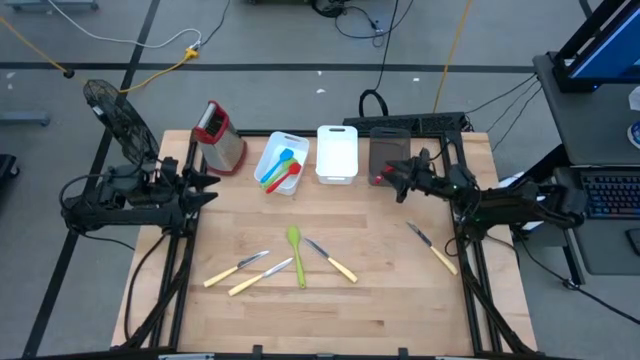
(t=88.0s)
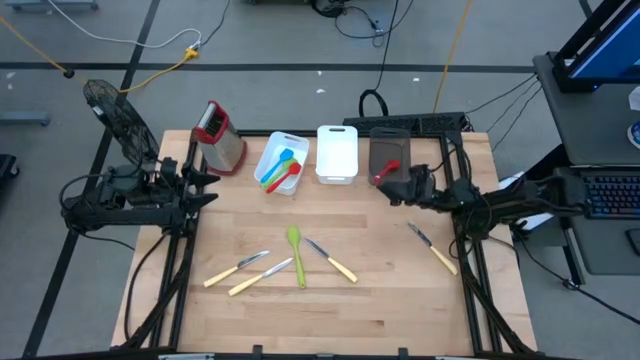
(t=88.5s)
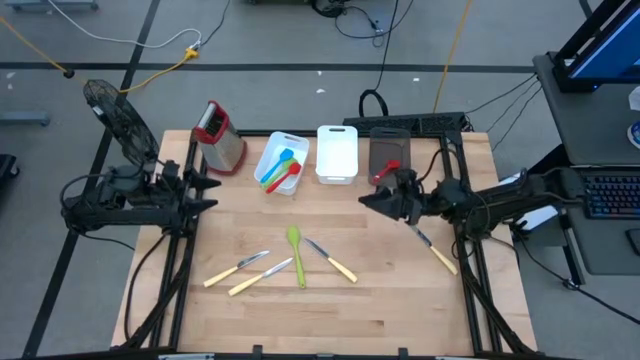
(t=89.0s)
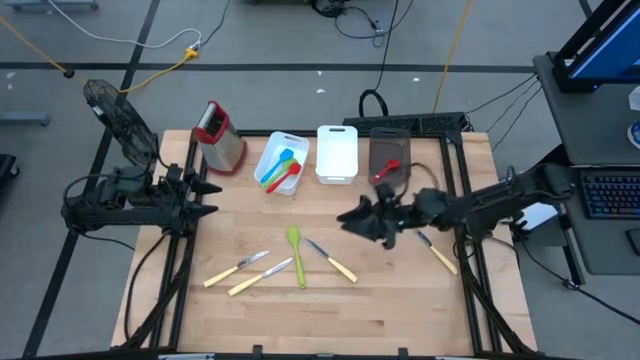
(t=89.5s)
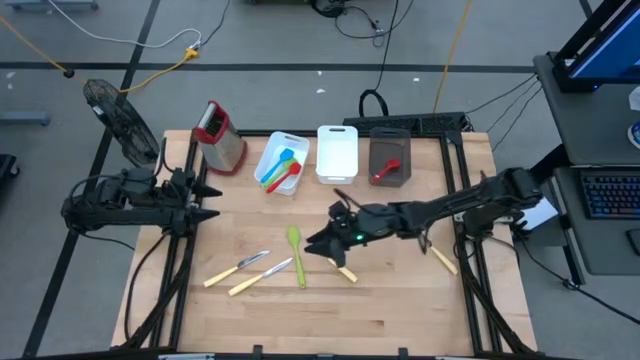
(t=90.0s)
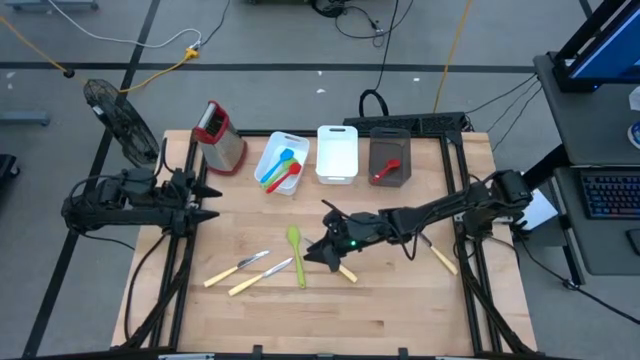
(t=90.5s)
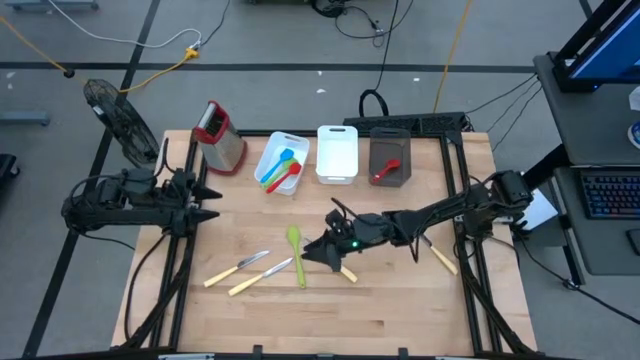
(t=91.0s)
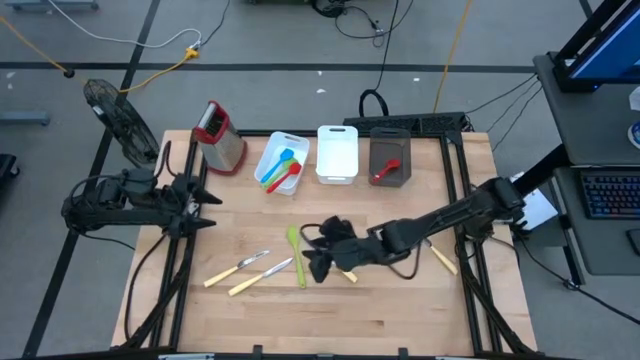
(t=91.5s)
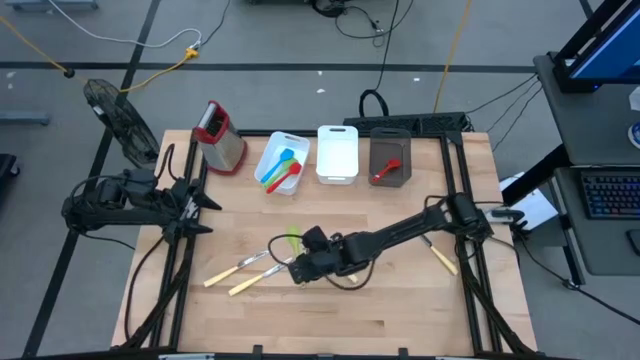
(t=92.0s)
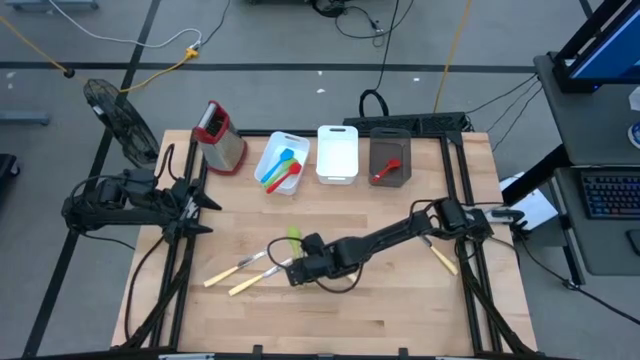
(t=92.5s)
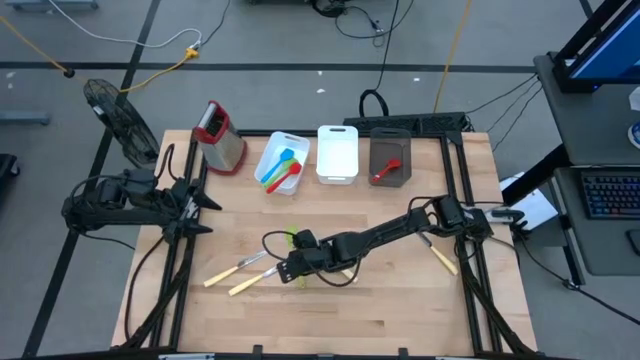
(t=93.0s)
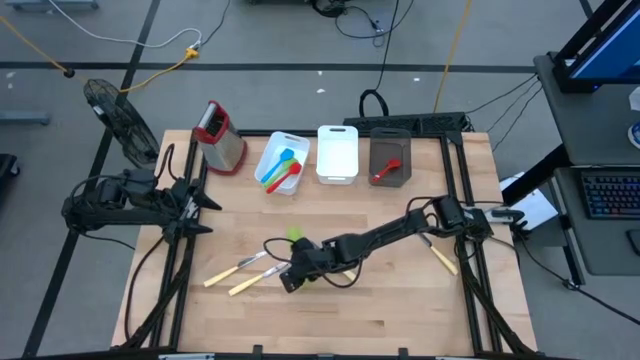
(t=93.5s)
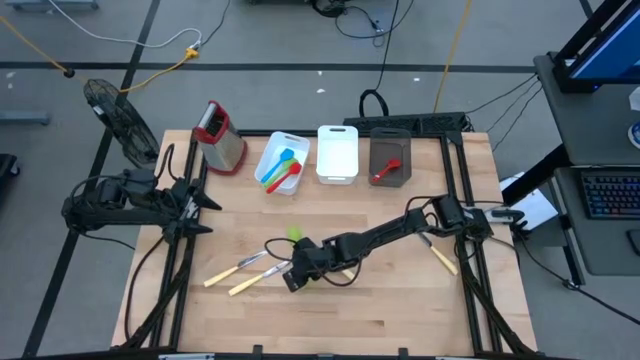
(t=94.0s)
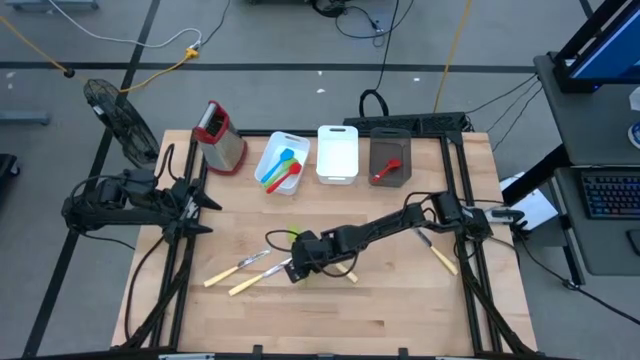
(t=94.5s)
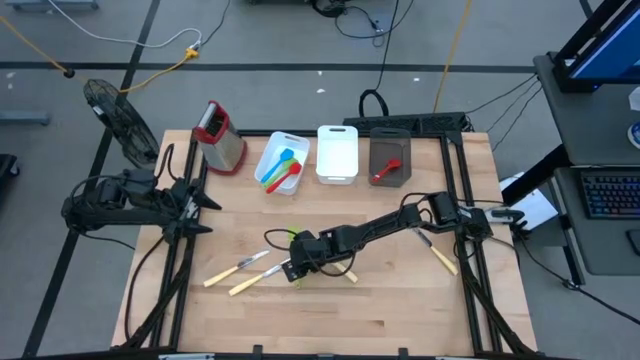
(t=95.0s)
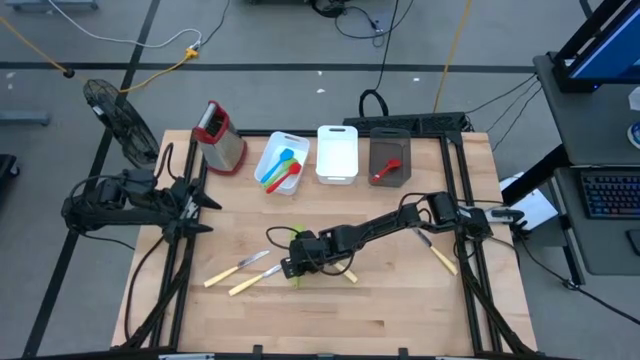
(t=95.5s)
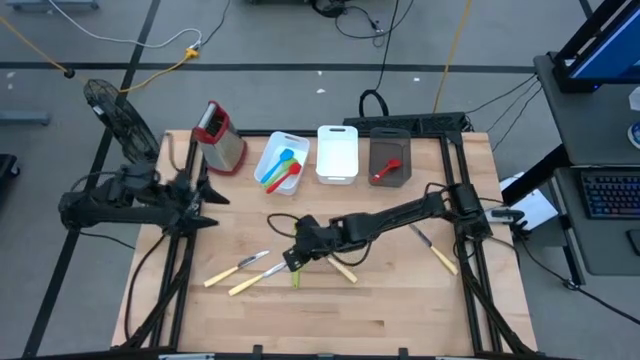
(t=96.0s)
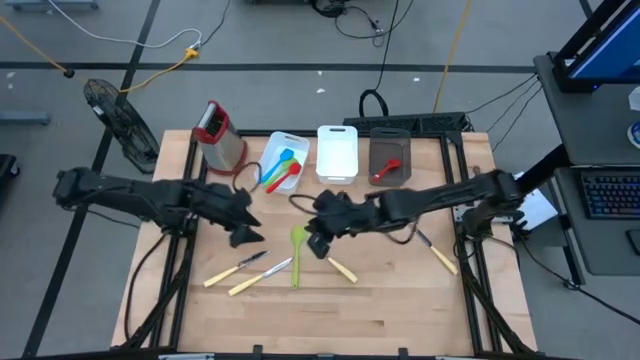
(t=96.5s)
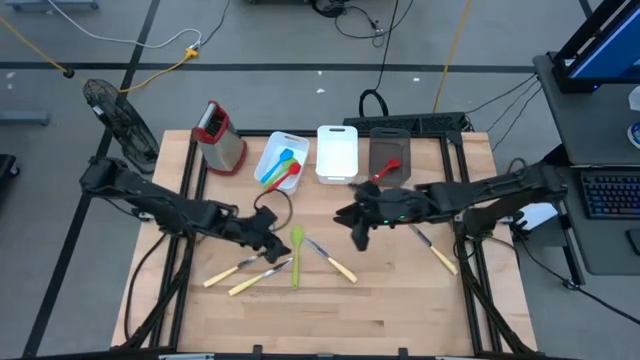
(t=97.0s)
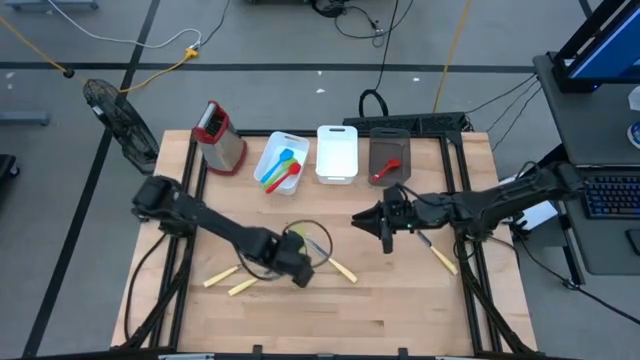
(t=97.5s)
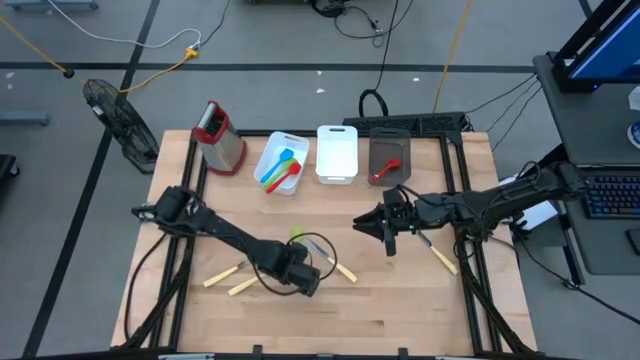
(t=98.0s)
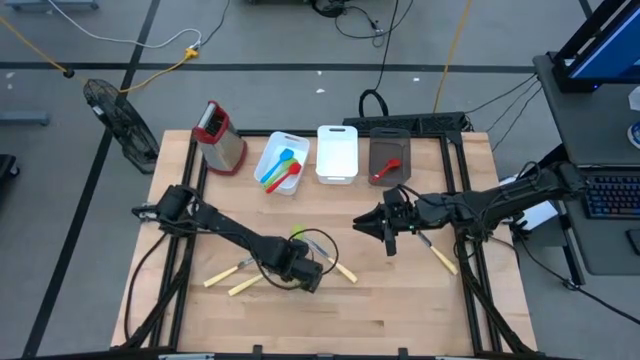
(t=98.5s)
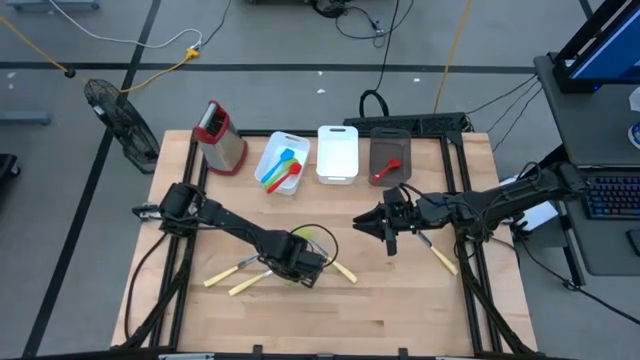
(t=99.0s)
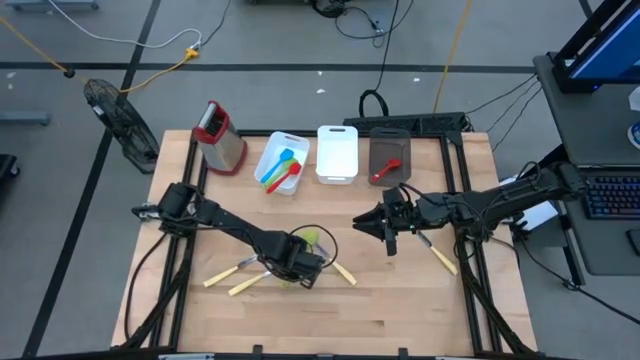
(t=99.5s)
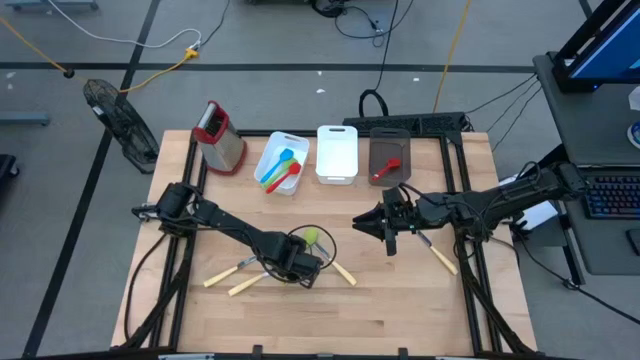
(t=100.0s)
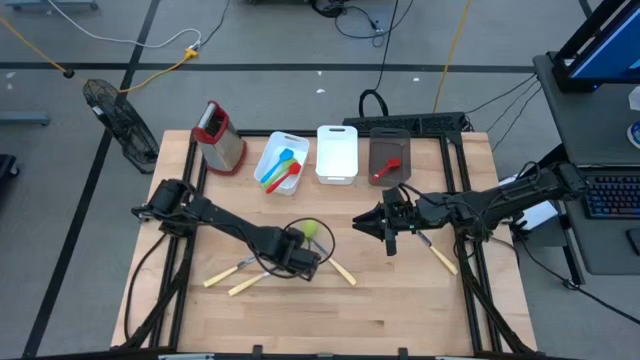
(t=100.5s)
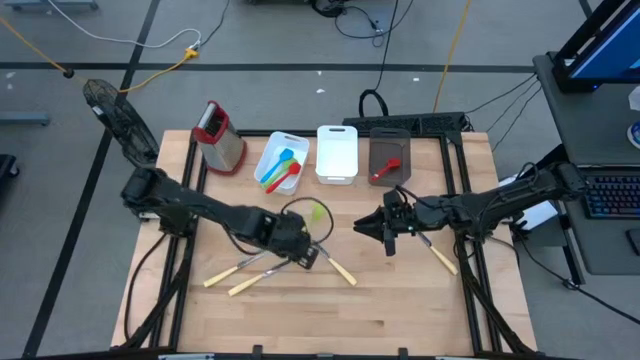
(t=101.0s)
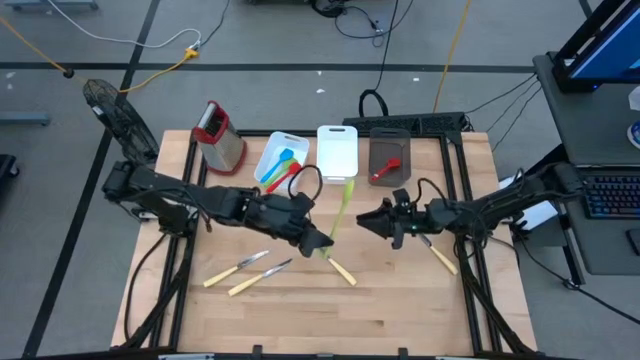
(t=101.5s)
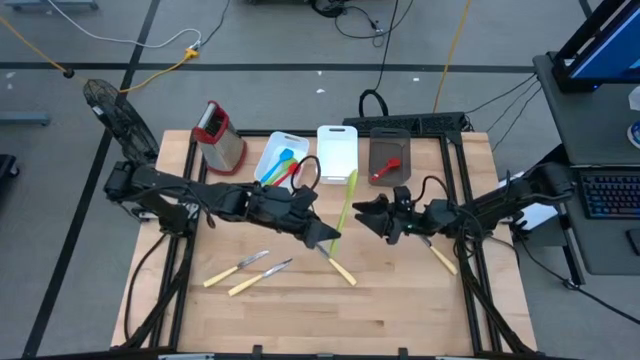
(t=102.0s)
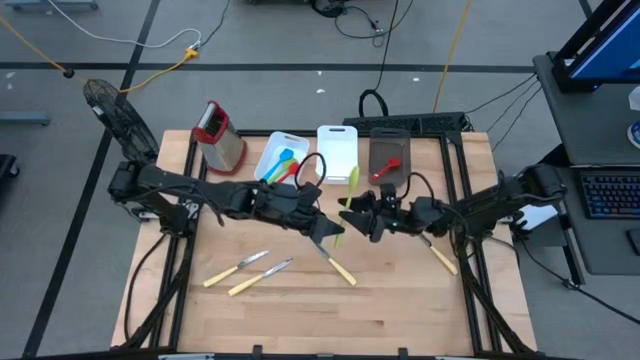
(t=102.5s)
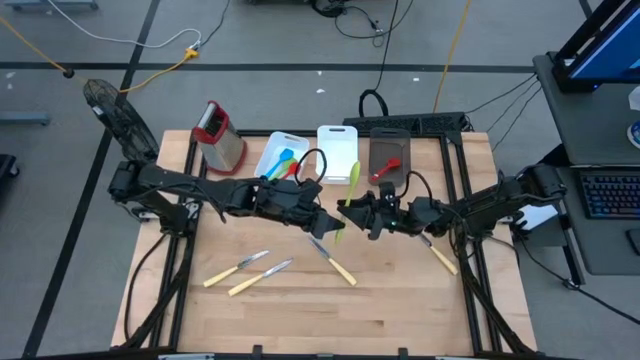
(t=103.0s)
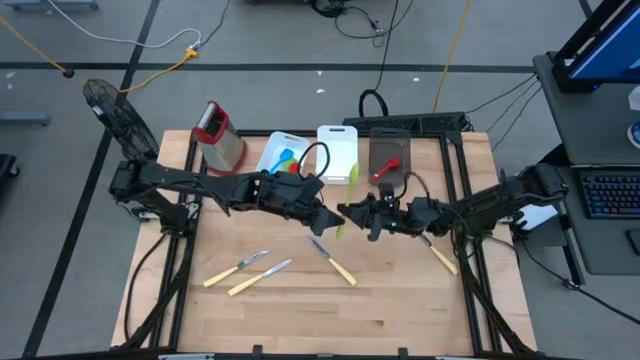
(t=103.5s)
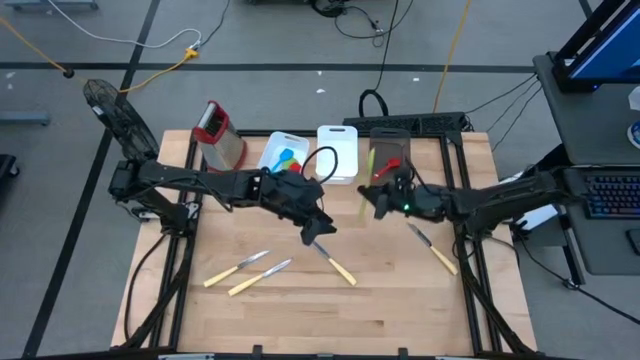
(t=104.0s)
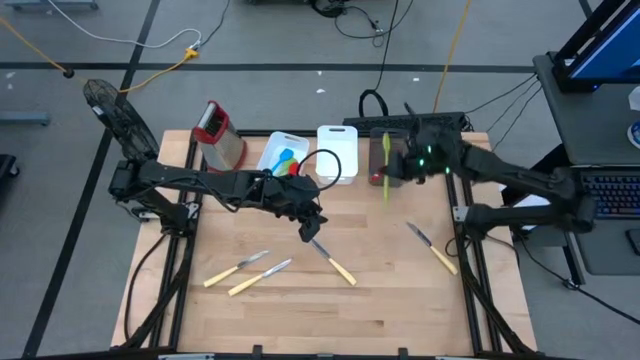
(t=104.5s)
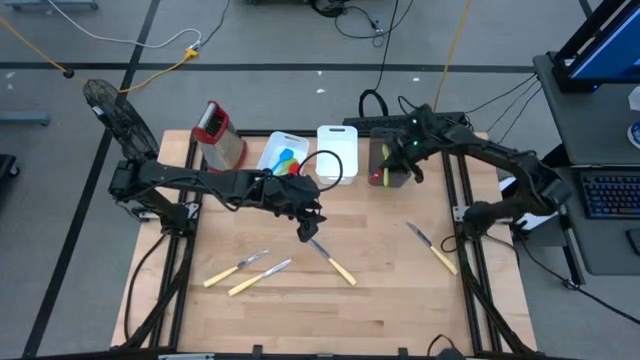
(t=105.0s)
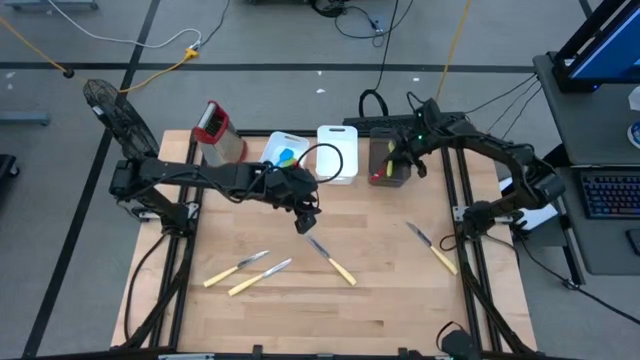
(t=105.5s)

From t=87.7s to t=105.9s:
Task: Pick & Place Kitchen Items
Put the green serving spoon into the black bin

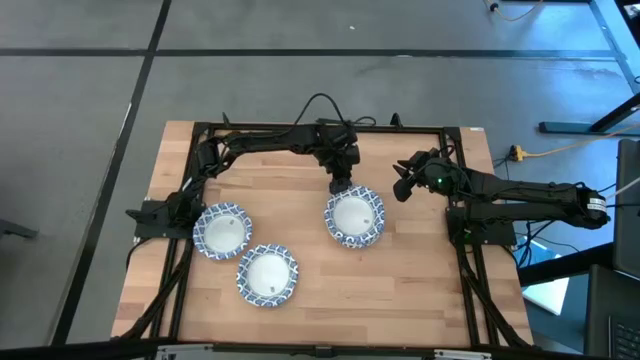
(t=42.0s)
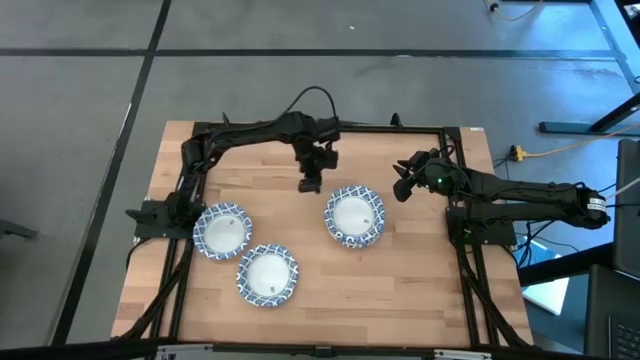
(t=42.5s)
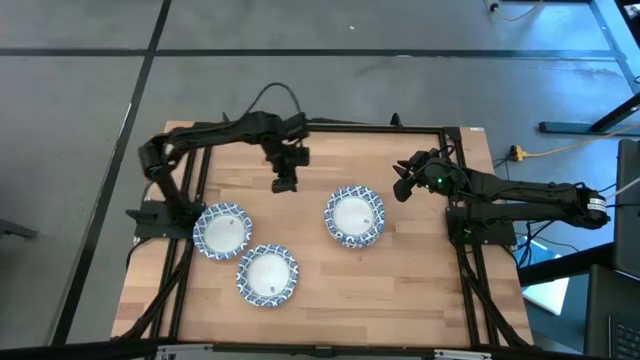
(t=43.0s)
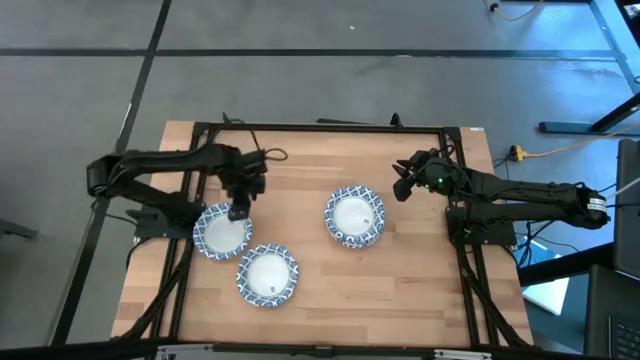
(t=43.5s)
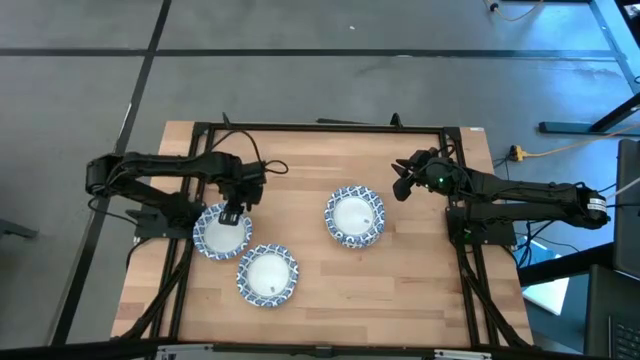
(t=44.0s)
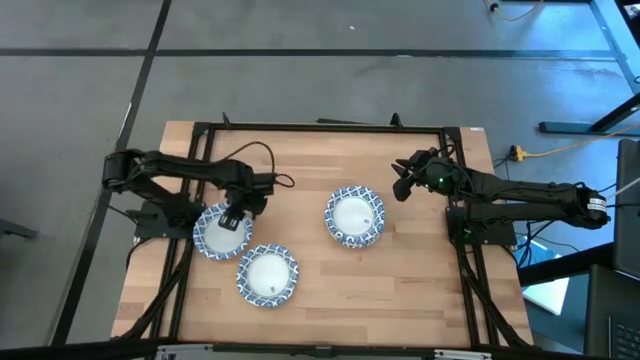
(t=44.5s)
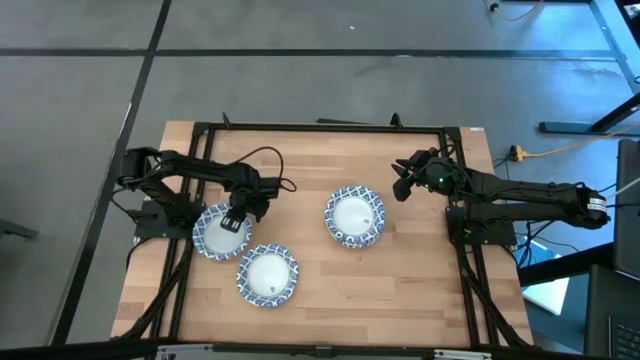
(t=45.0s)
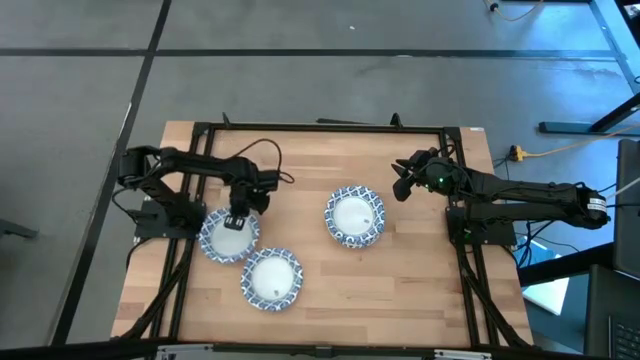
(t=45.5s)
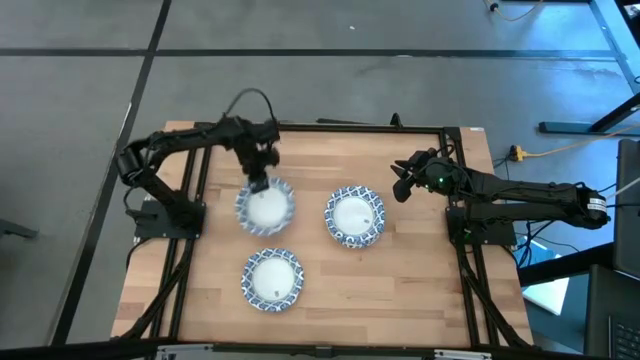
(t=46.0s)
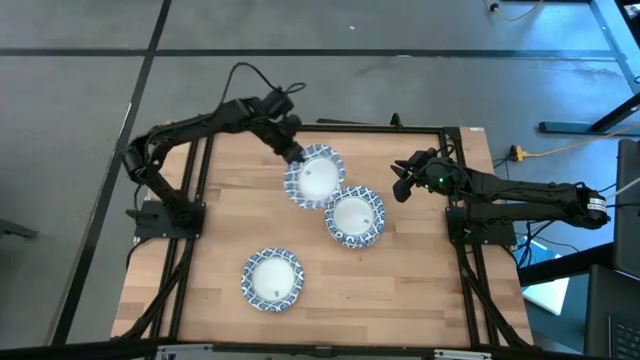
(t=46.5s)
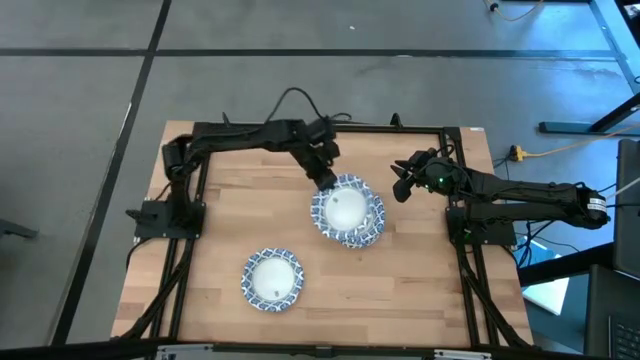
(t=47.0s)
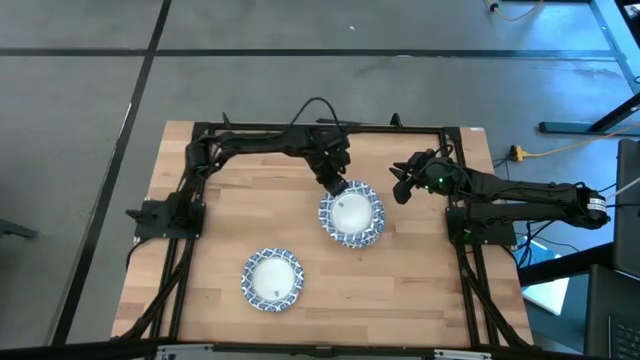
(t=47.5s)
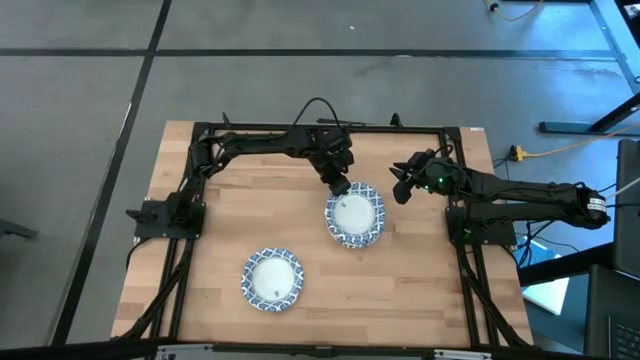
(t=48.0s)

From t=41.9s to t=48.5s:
Task: Nest bowls inside each other
Stack the white patterned bowls on top of the other white patterned bowls
